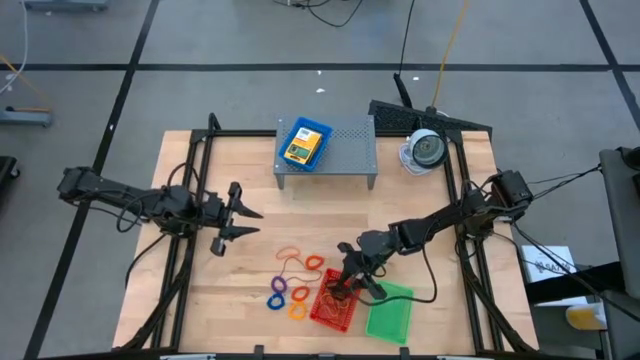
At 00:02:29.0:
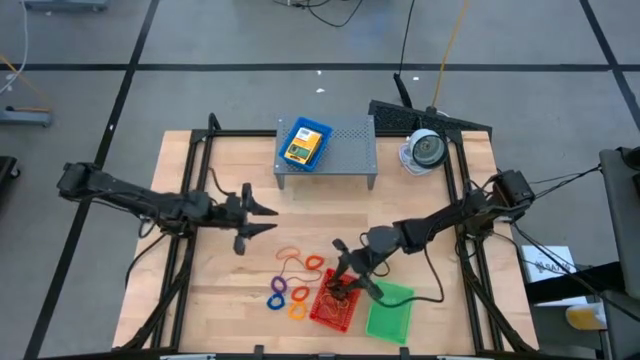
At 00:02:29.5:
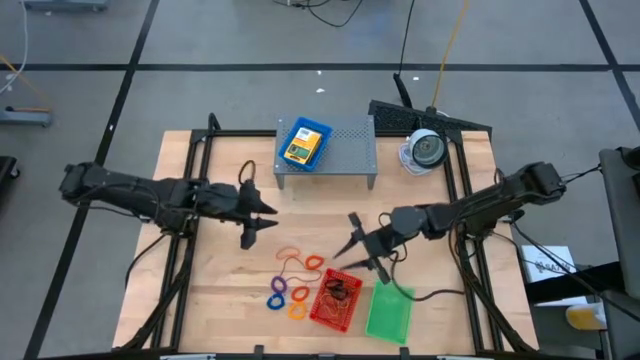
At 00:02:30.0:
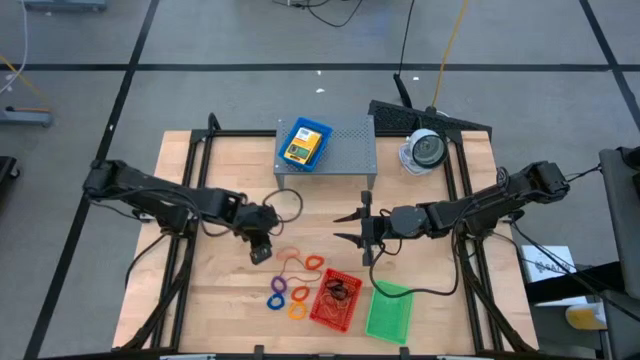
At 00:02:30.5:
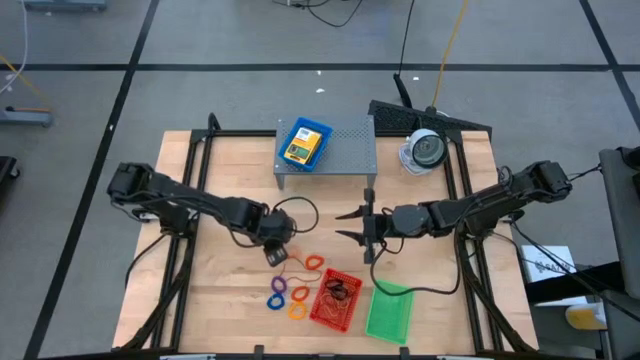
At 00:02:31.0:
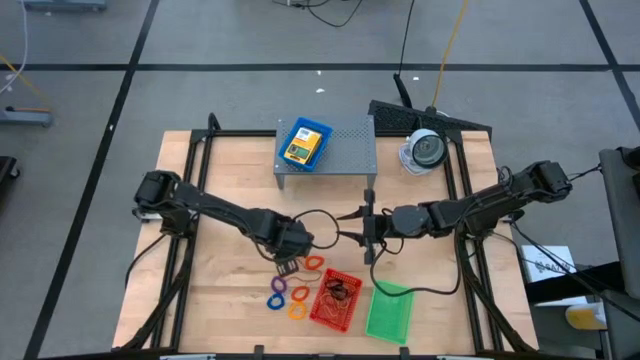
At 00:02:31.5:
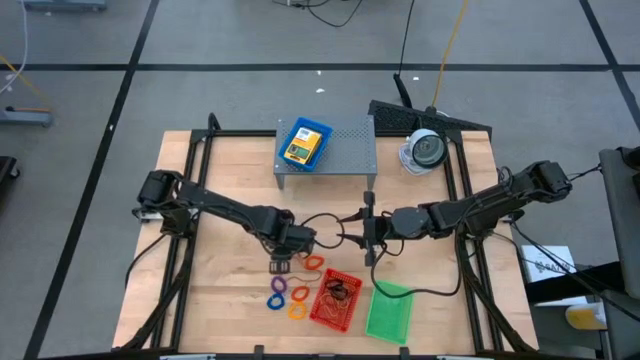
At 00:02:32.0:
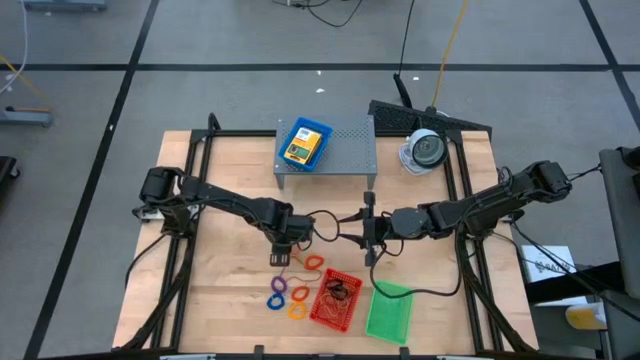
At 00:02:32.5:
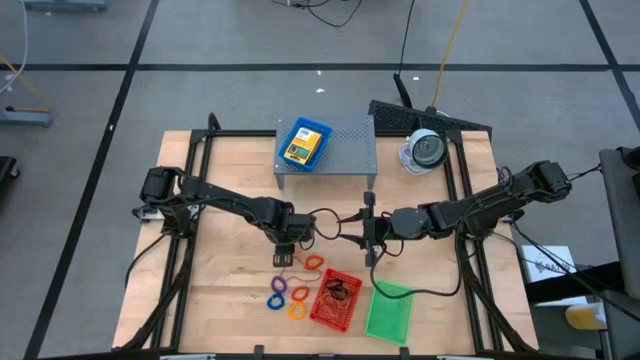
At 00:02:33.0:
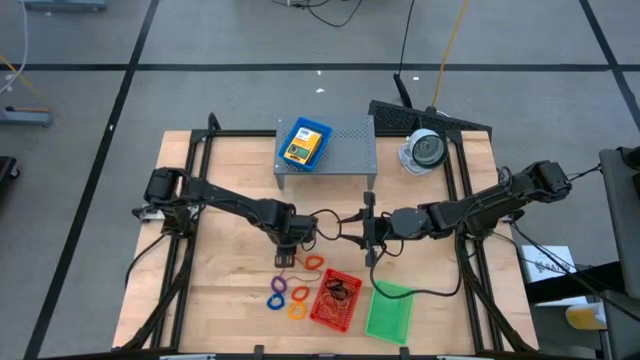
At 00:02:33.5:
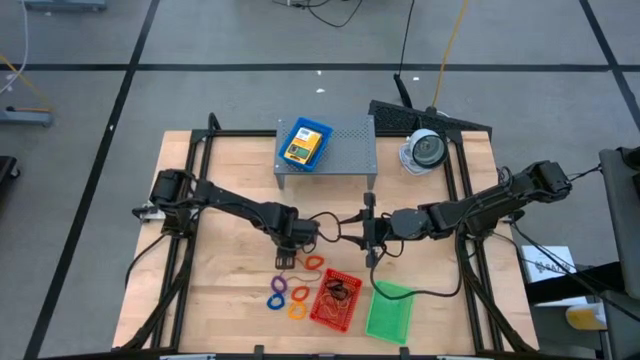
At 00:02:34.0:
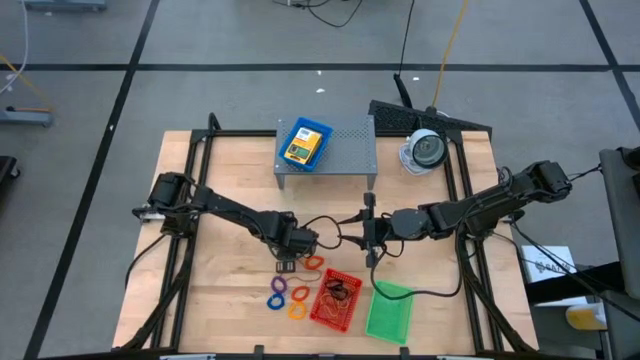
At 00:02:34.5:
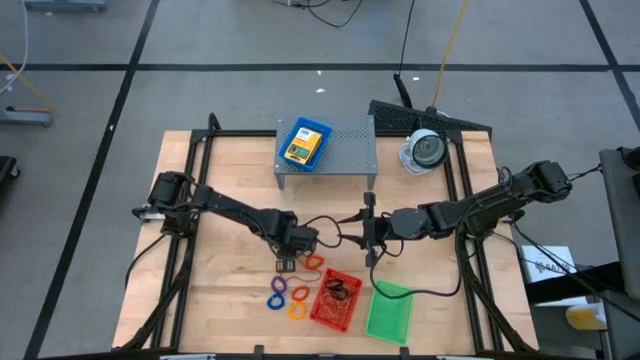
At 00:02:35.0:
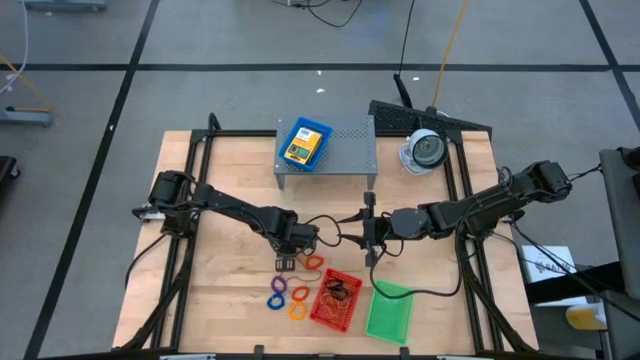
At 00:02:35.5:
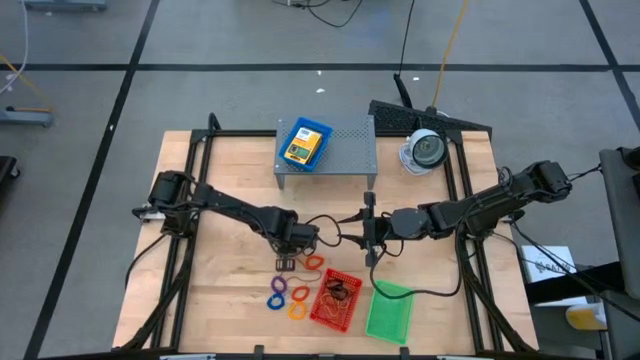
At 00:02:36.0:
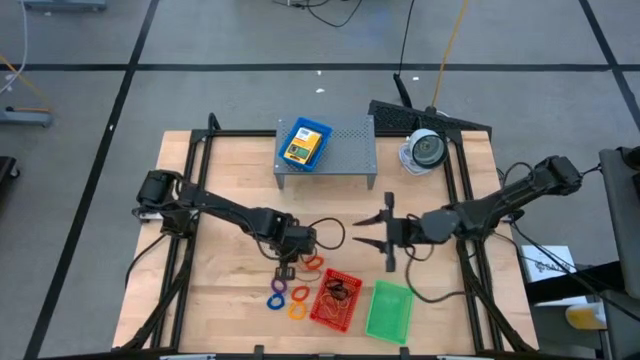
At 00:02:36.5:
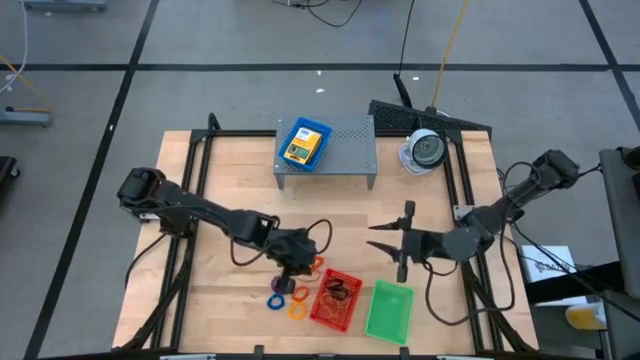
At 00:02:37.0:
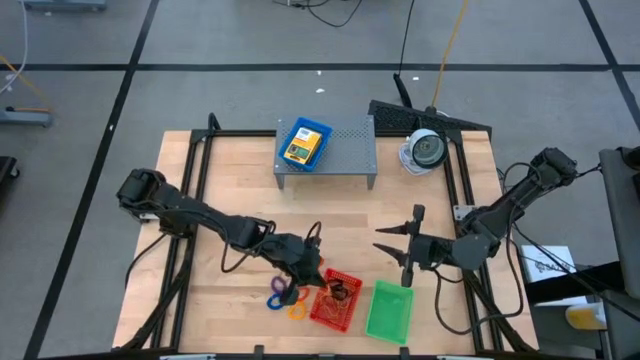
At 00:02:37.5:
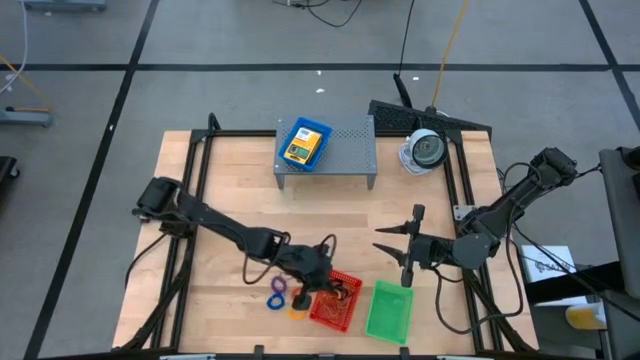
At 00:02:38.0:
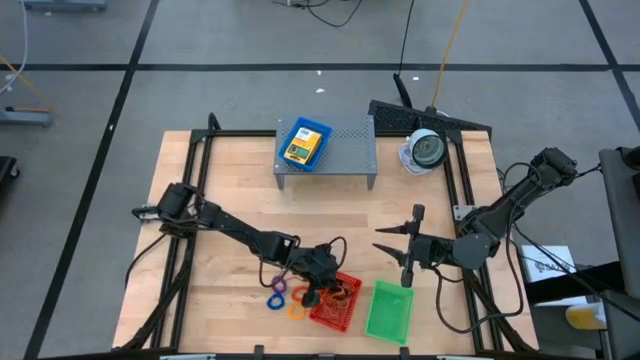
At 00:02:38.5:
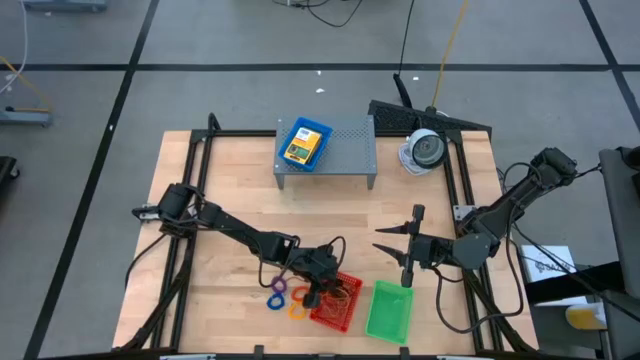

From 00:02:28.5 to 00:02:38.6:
Task: Pick & Place Office Desk Supplies
Put the orange rubber band into the red bin

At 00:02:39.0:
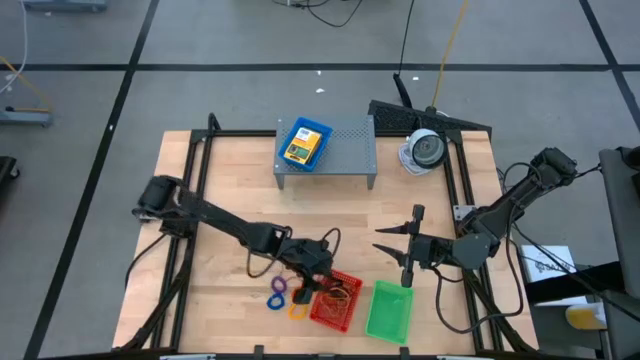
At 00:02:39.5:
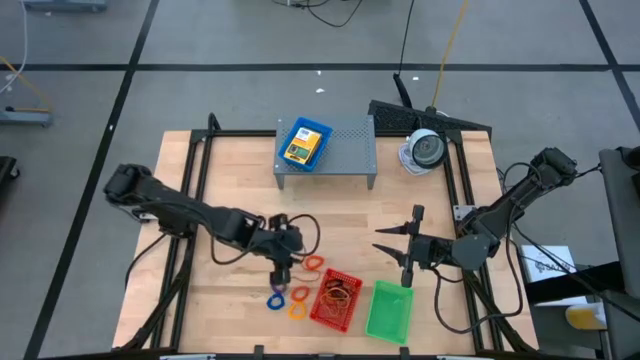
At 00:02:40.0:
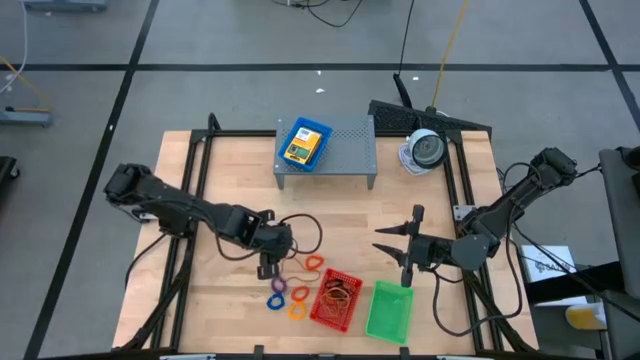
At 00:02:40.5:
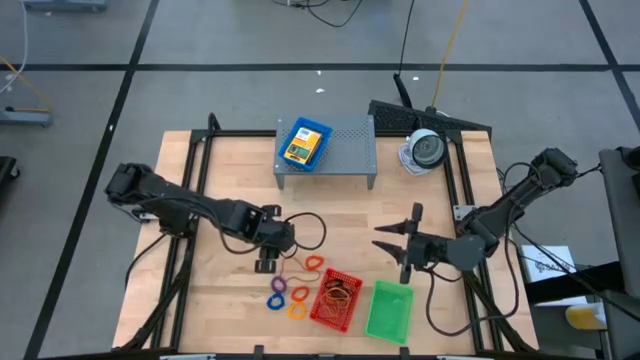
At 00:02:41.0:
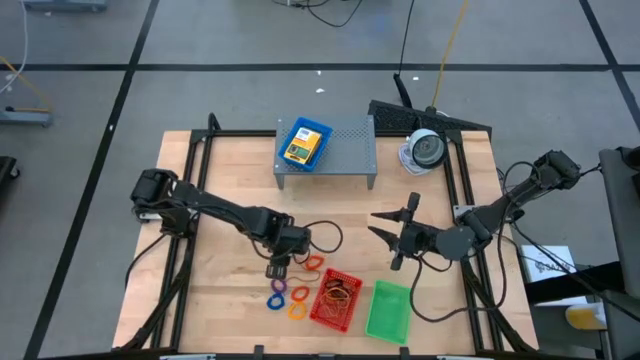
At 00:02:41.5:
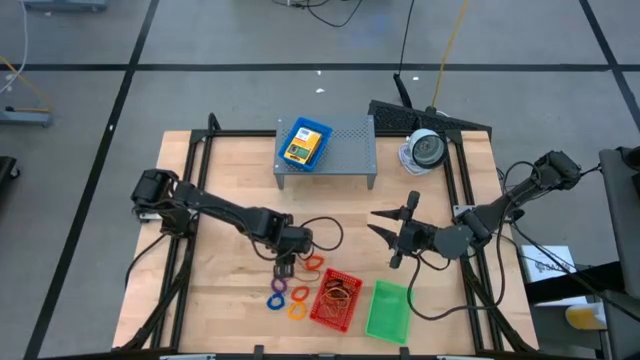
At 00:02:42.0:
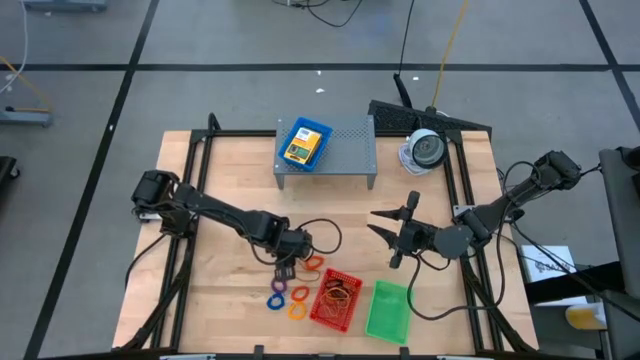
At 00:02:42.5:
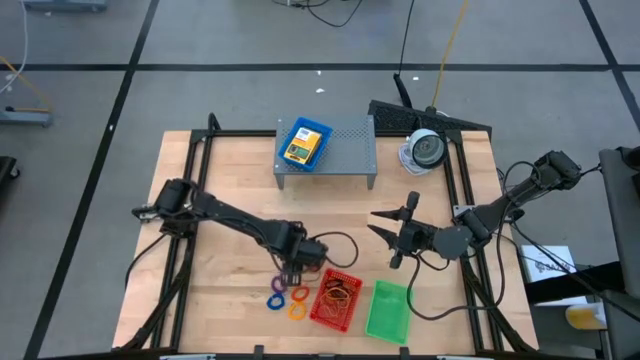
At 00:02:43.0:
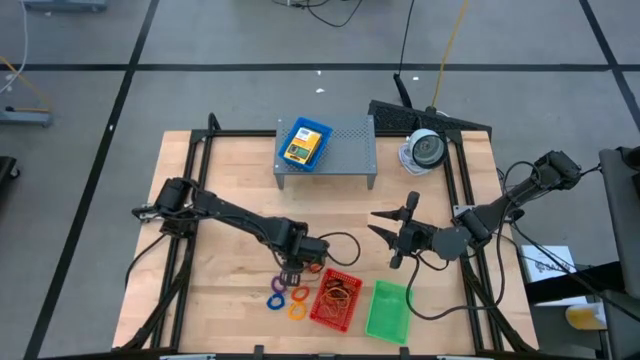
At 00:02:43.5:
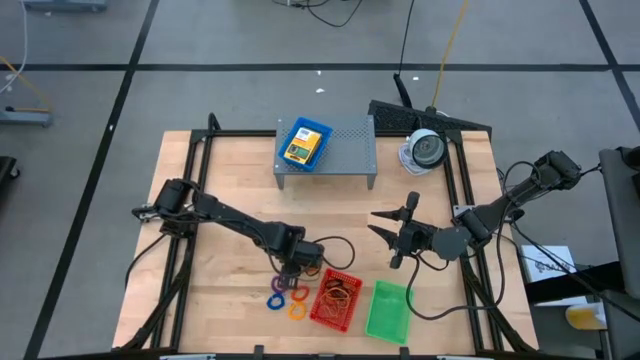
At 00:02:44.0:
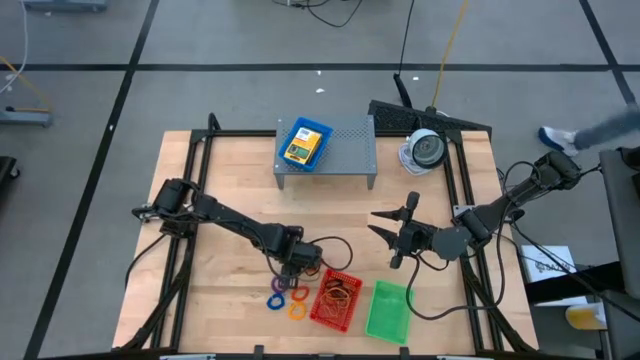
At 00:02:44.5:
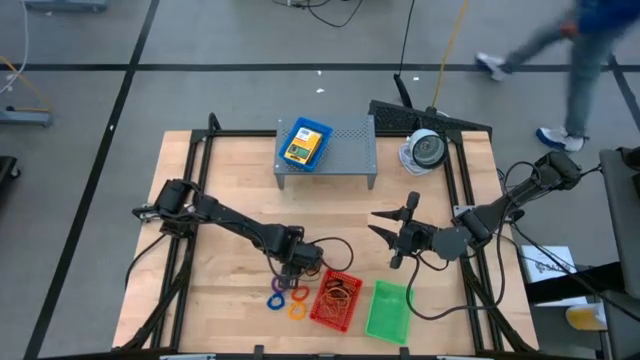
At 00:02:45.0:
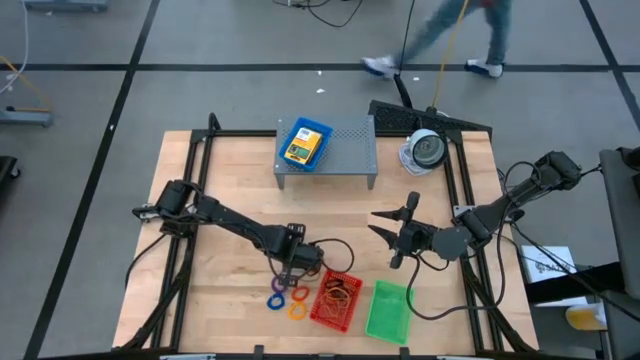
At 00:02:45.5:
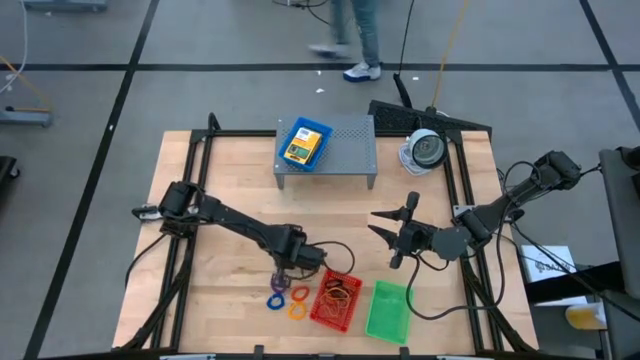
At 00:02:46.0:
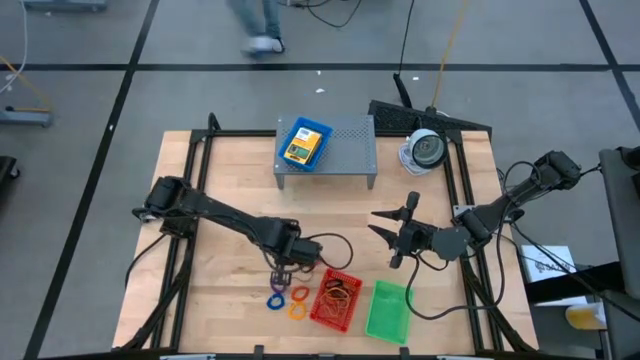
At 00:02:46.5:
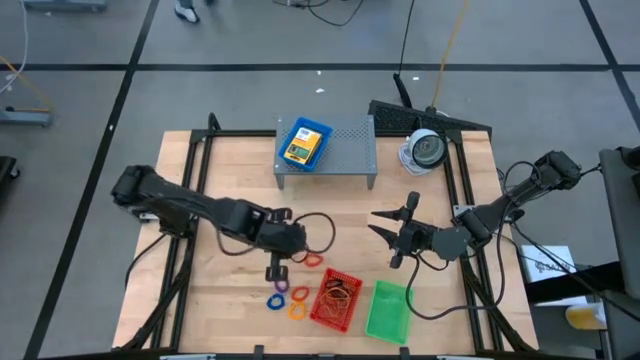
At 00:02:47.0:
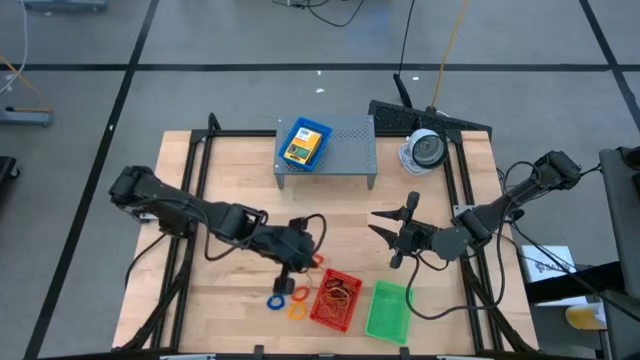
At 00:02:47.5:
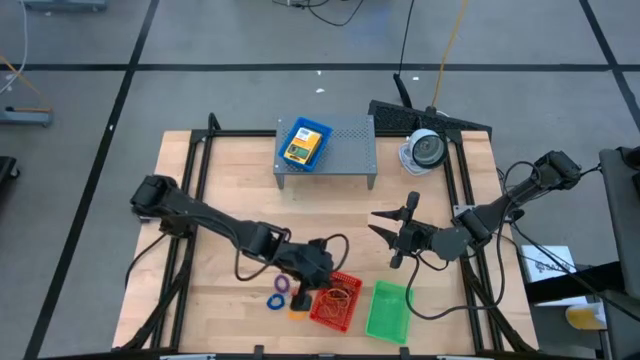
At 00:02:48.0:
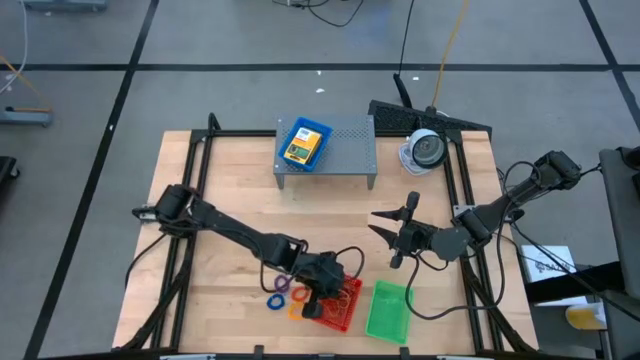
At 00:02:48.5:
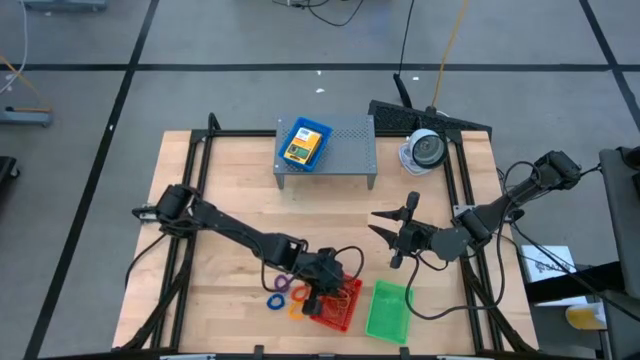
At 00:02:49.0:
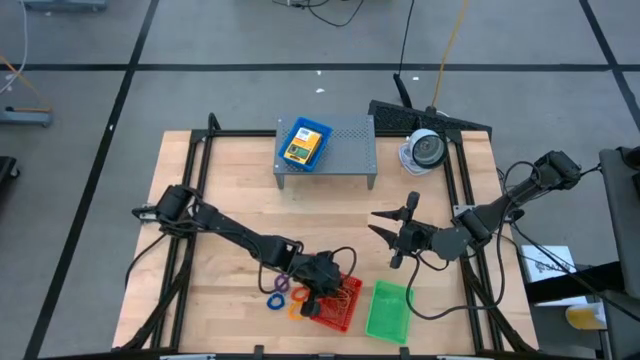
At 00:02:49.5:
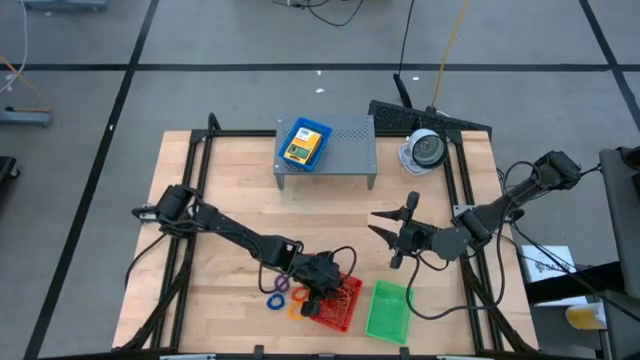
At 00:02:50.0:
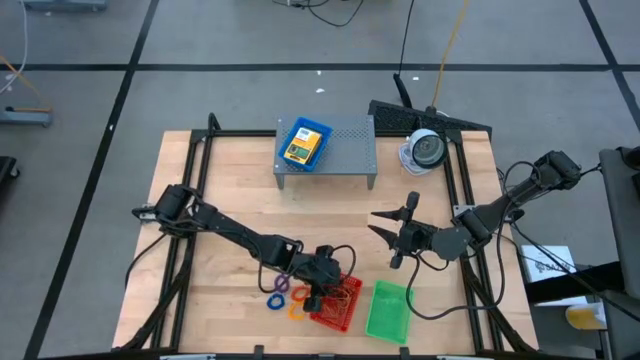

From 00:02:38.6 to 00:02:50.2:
Put the red rubber band into the red bin
